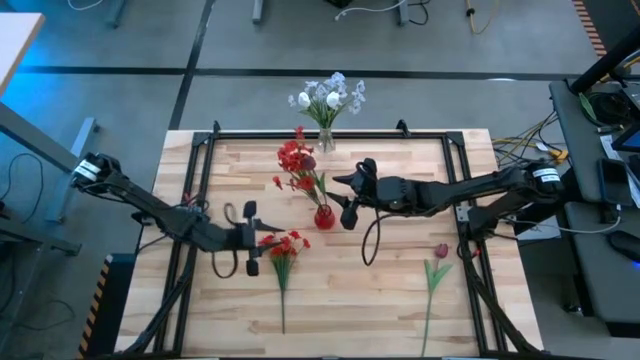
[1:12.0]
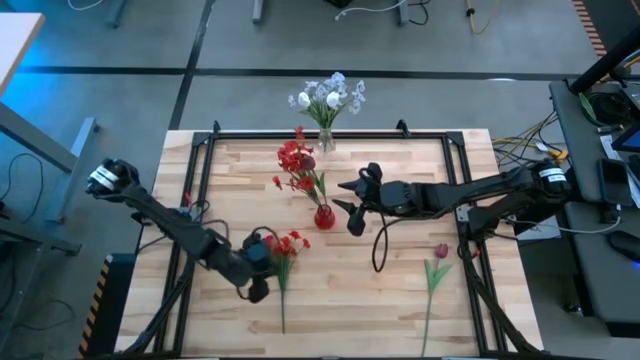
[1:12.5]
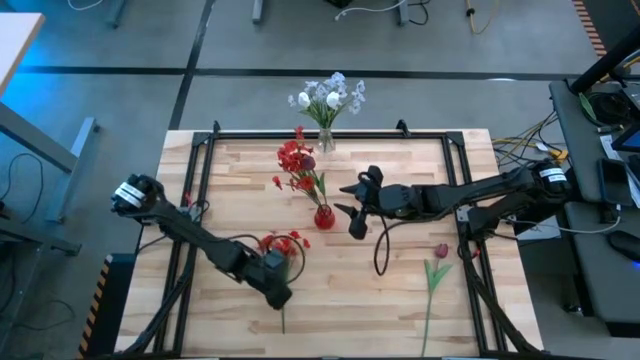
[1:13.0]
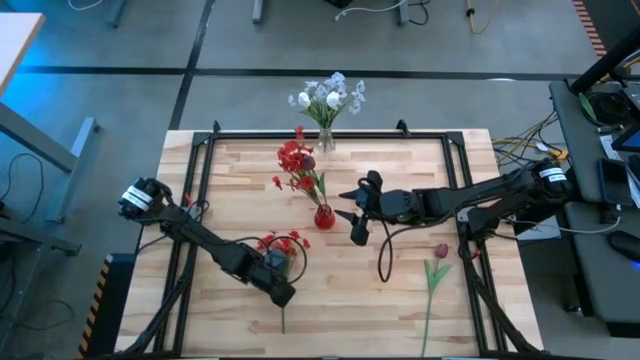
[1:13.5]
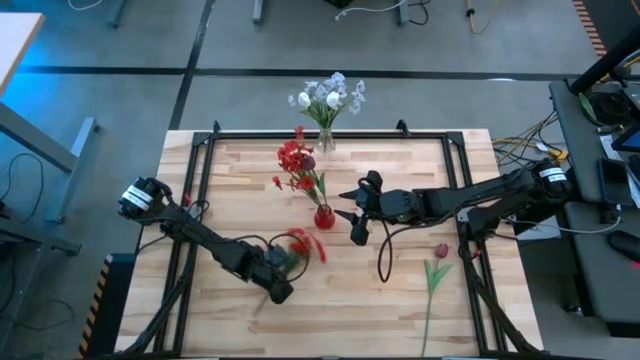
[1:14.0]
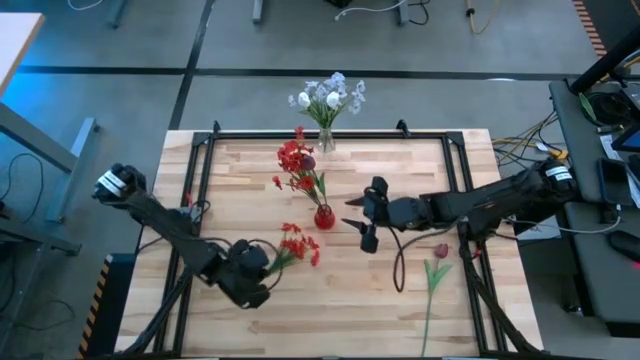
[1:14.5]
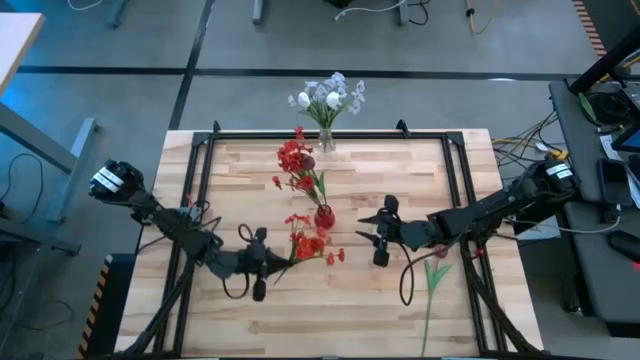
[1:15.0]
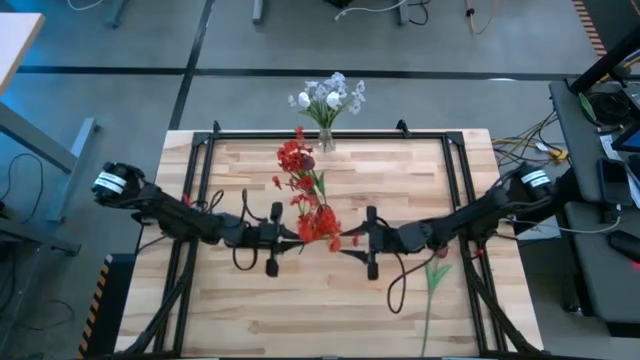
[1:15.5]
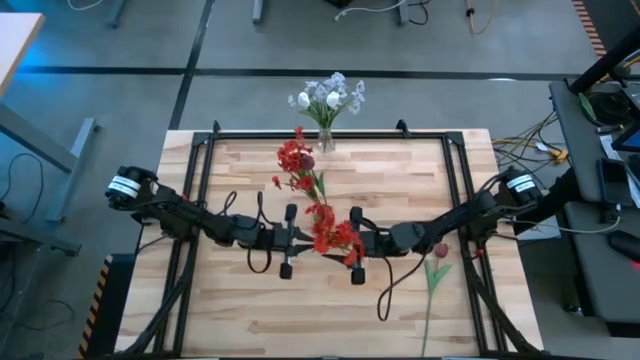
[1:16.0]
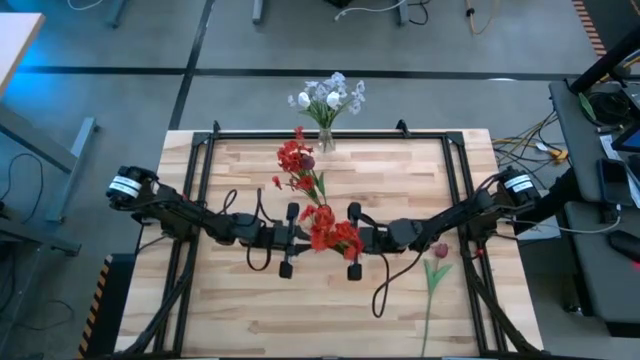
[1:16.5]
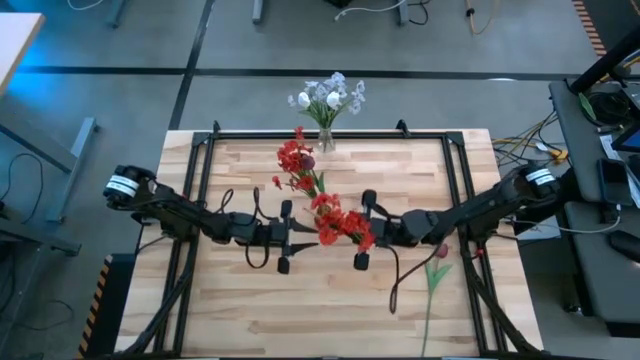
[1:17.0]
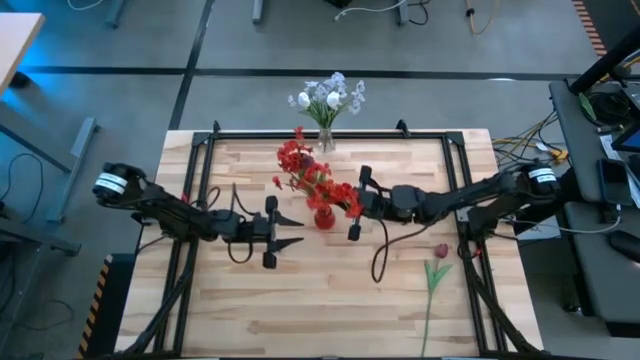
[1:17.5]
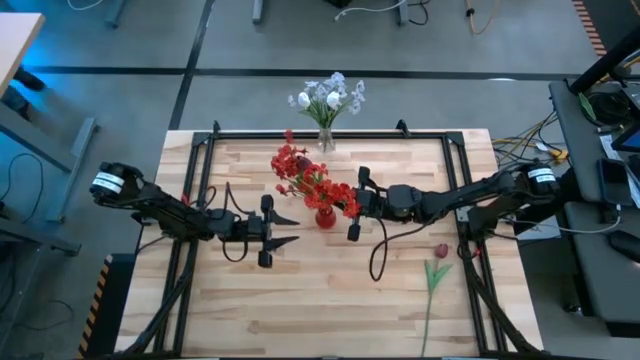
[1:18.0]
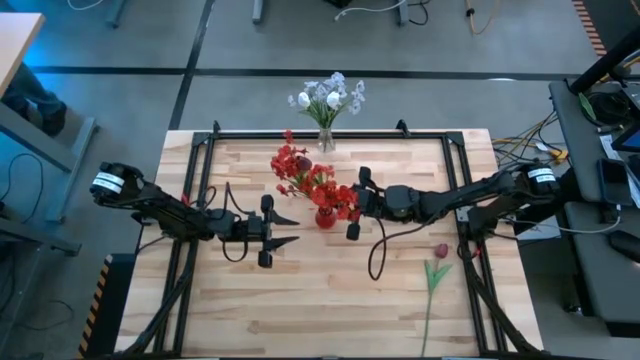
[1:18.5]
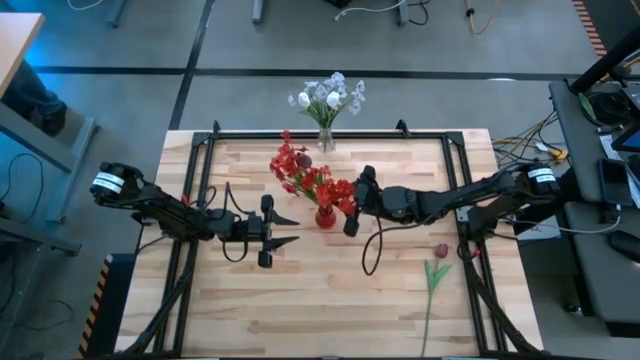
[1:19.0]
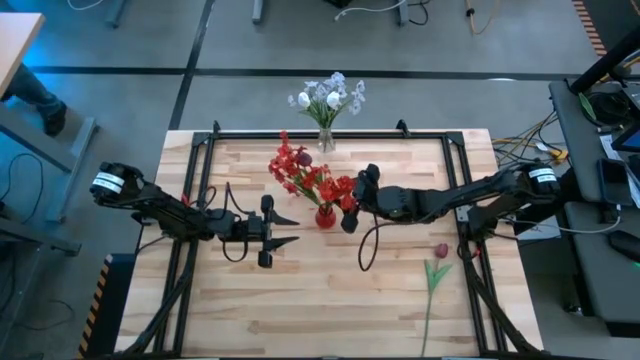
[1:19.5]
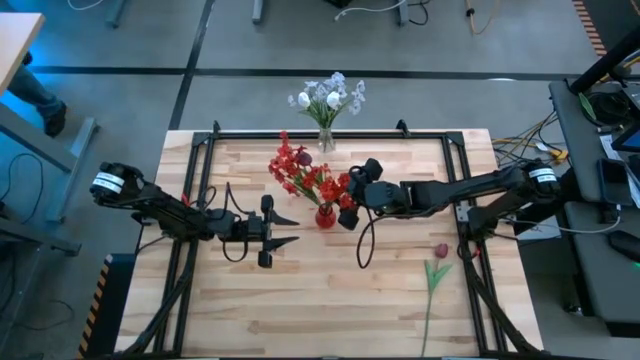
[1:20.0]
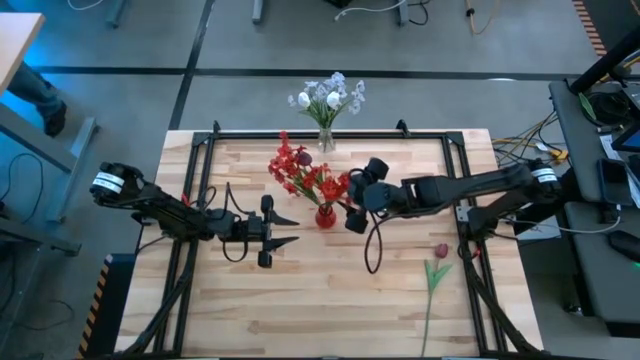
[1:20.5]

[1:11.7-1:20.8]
Task: Sort flowers into vase by color
Put the red flowers into the red vase

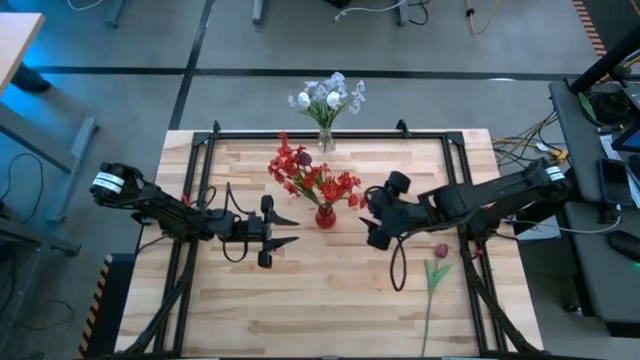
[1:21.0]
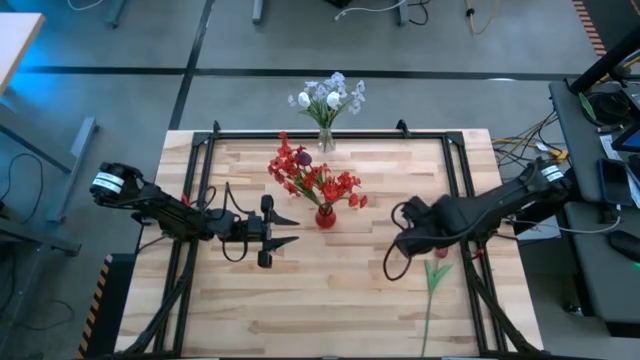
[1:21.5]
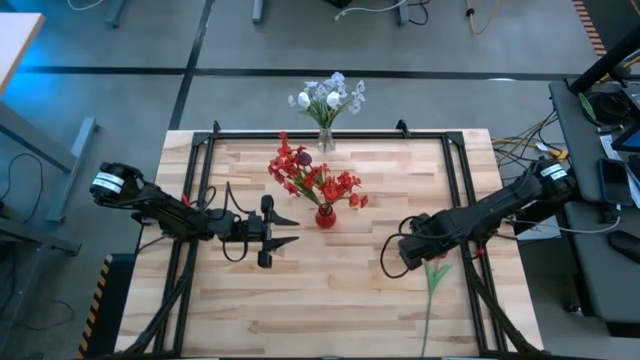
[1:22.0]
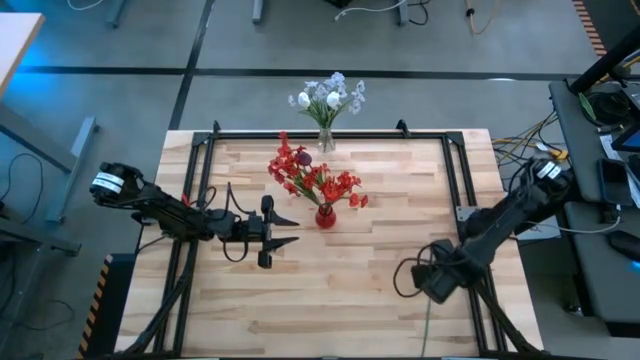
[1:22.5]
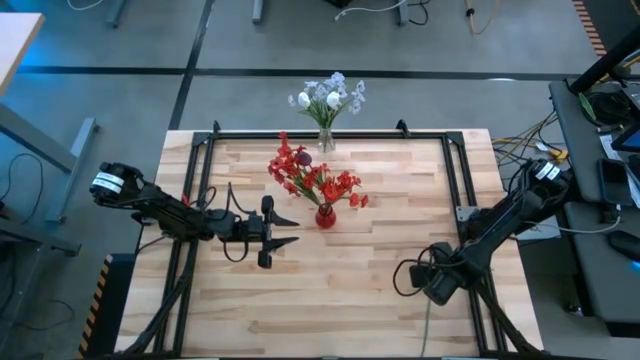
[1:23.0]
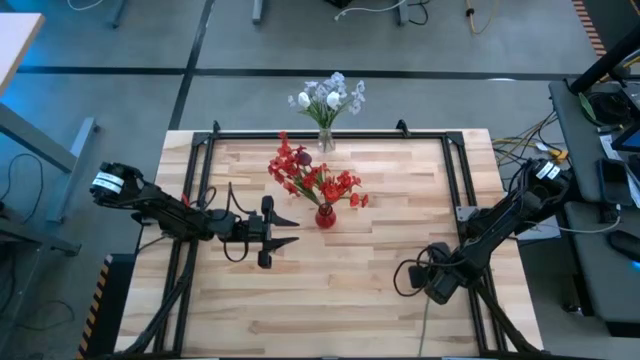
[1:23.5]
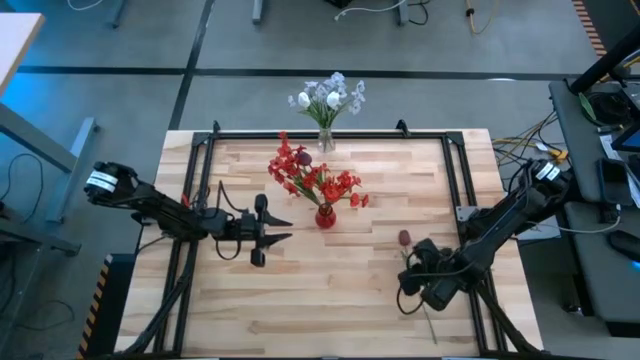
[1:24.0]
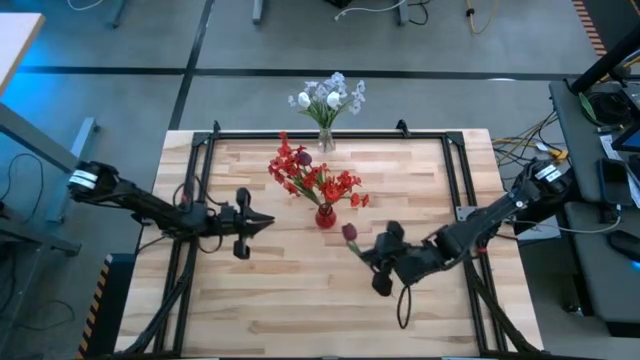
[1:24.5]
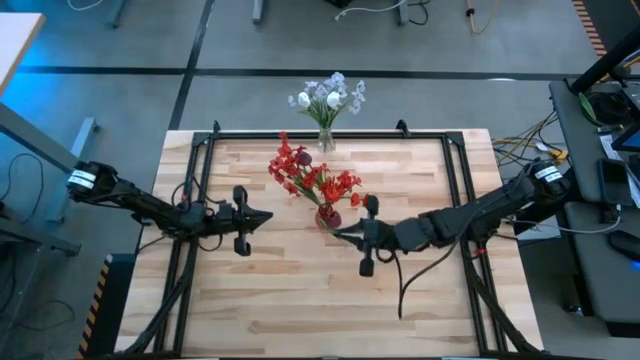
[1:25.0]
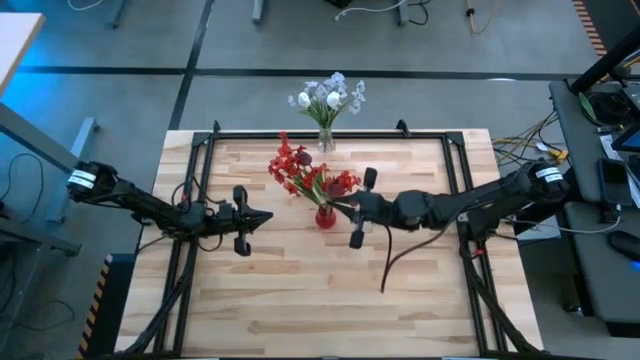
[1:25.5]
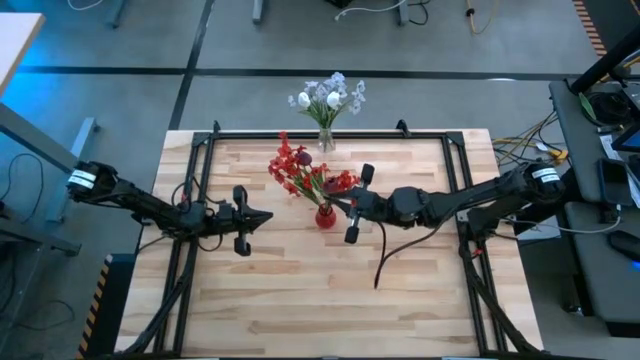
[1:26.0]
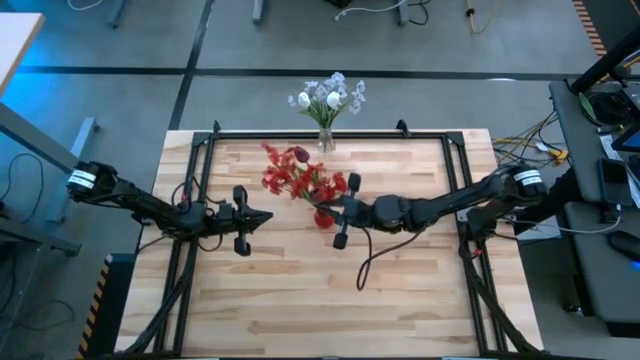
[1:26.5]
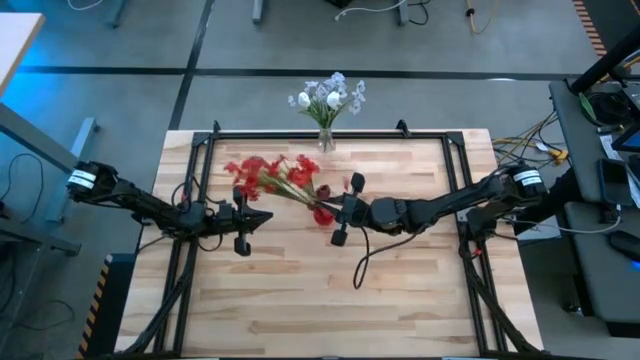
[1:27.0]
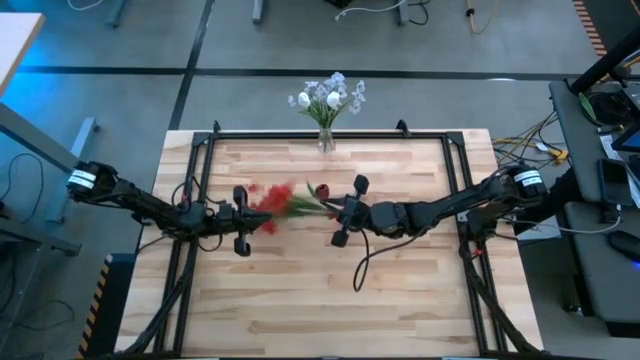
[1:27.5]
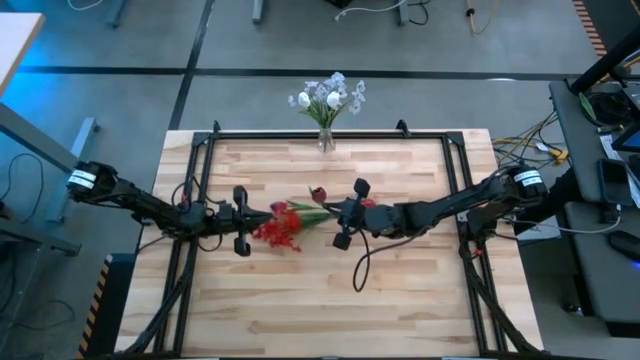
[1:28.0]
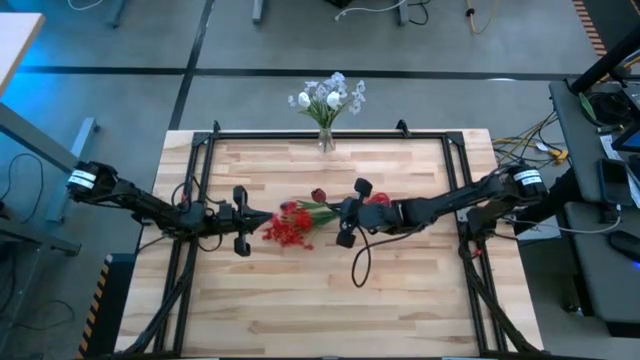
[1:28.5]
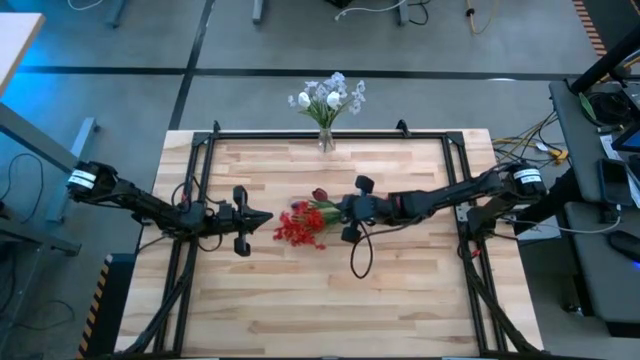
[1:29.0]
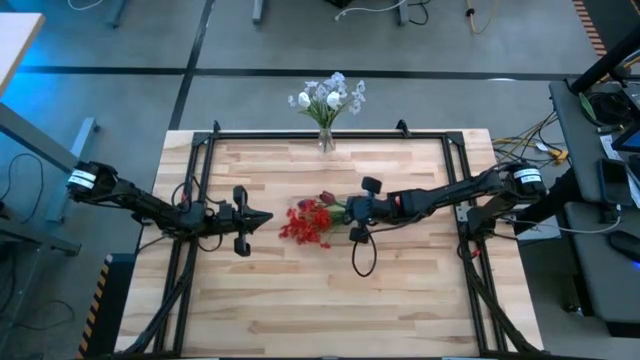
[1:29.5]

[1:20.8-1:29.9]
Put the dark red tulip flower into the red vase

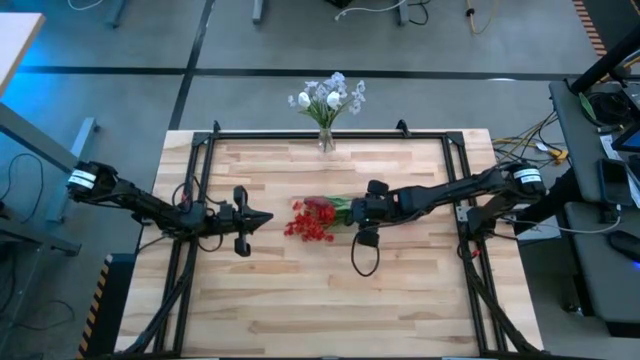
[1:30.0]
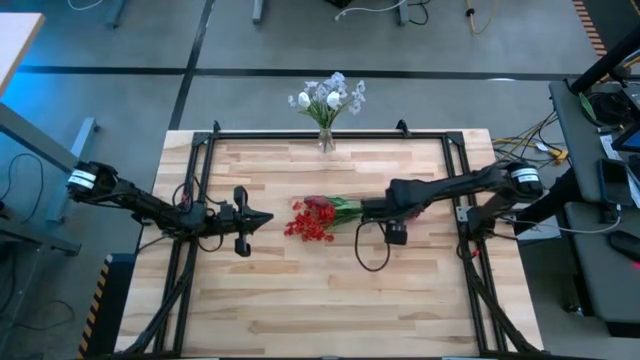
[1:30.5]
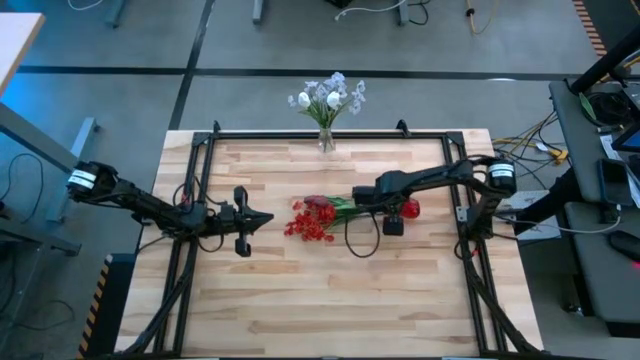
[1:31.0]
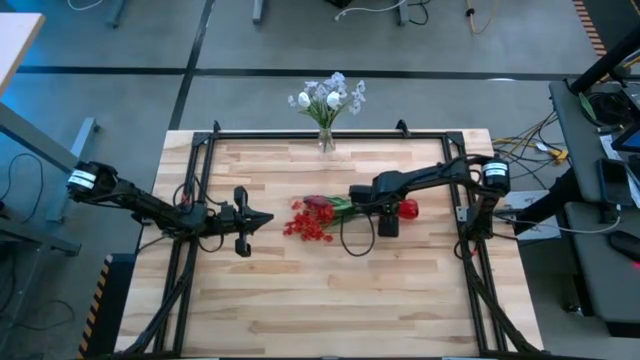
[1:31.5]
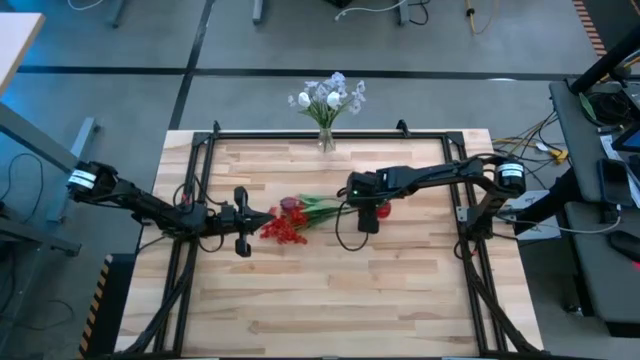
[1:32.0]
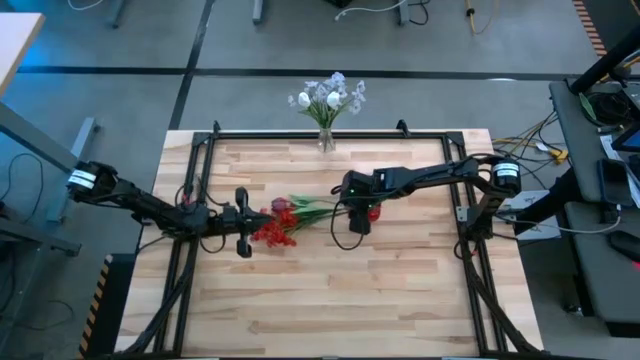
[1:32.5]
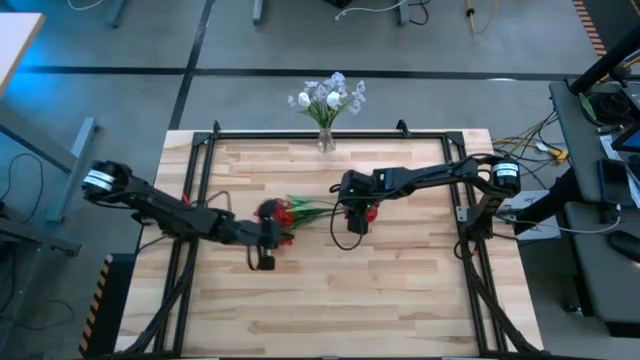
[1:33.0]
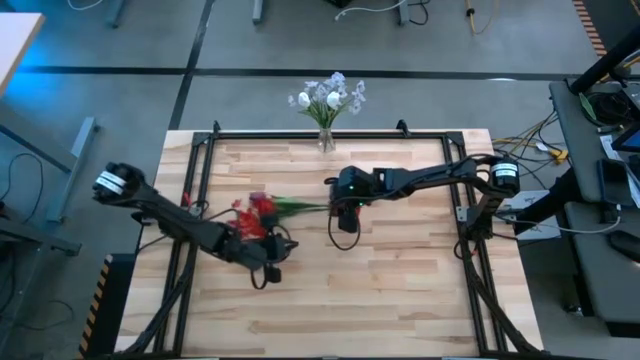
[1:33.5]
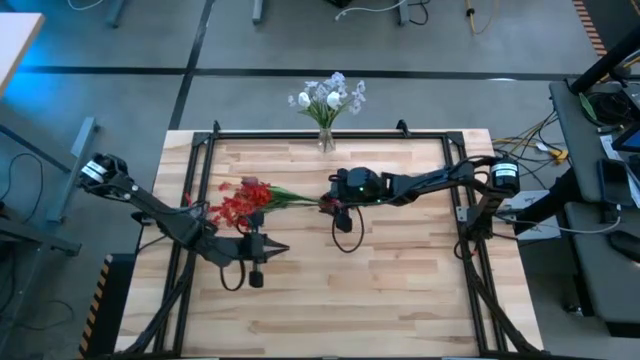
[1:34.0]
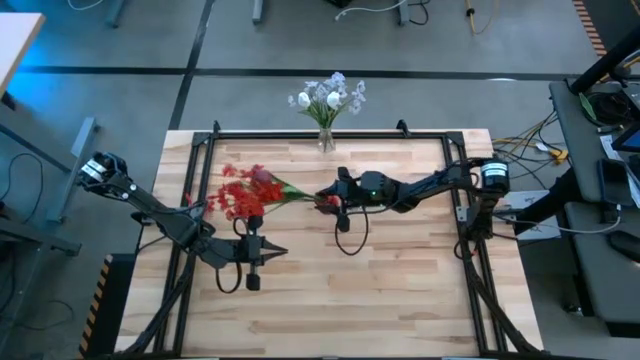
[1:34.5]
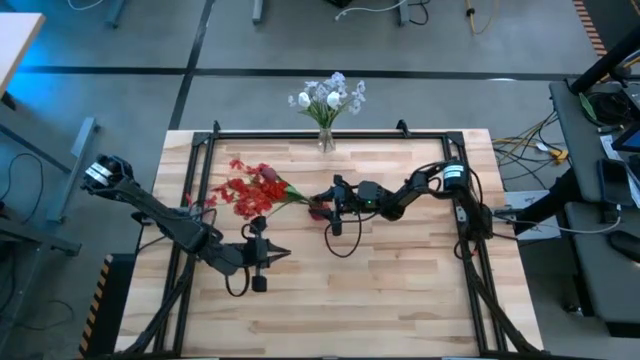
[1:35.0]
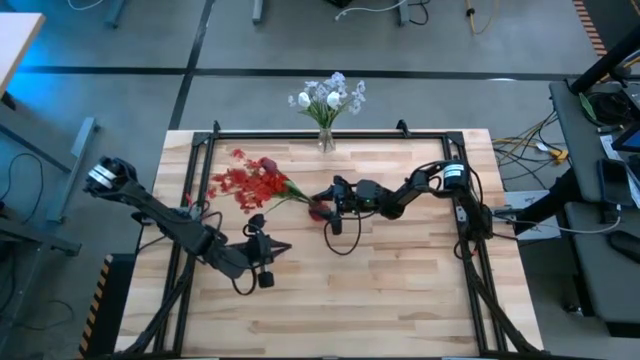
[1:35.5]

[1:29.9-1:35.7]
Adjust the red flower vase
